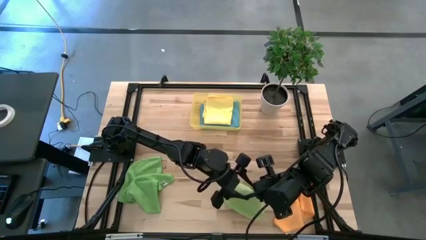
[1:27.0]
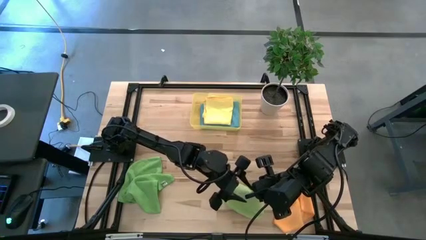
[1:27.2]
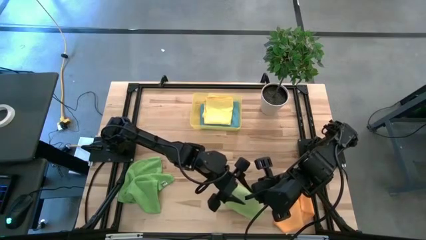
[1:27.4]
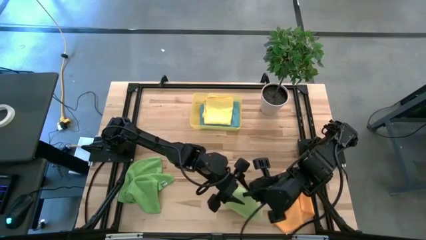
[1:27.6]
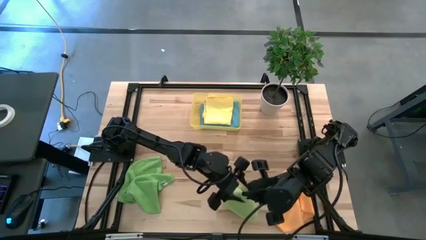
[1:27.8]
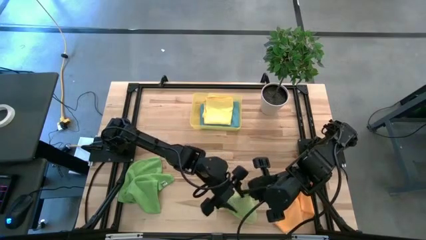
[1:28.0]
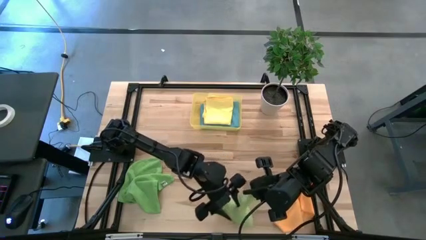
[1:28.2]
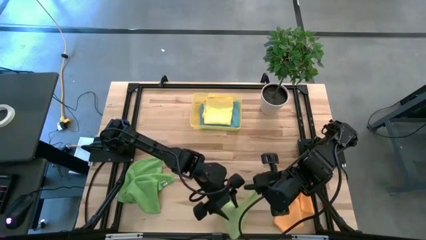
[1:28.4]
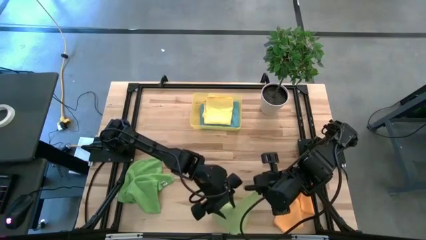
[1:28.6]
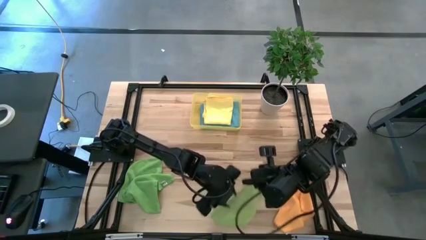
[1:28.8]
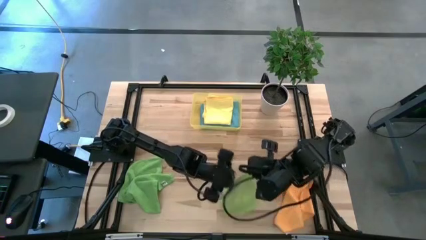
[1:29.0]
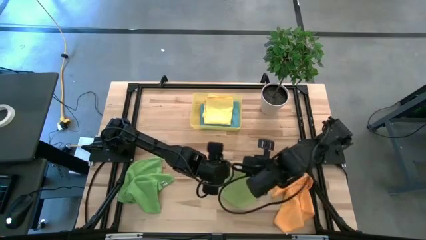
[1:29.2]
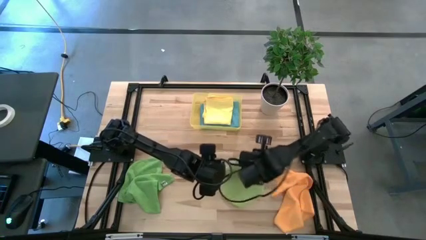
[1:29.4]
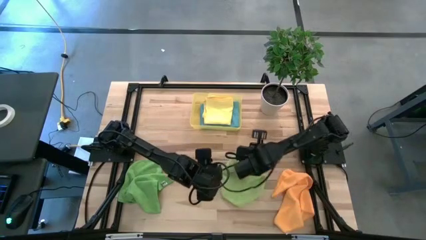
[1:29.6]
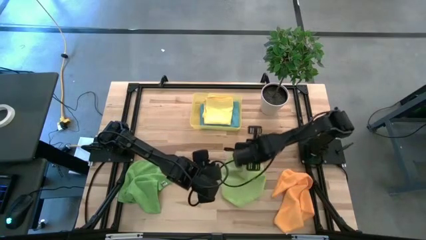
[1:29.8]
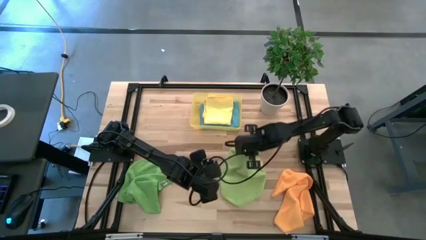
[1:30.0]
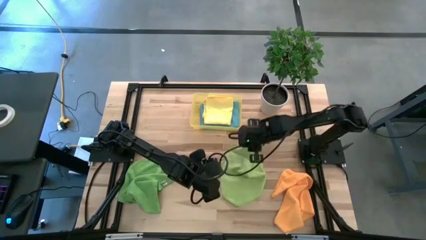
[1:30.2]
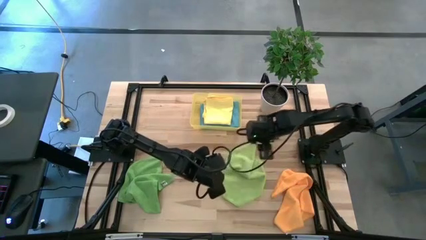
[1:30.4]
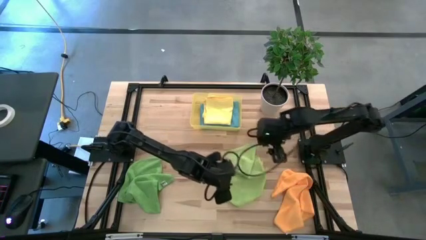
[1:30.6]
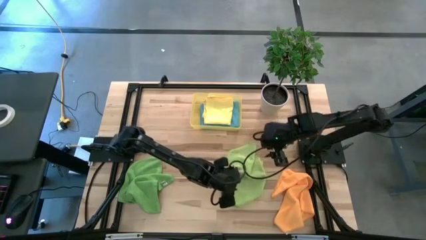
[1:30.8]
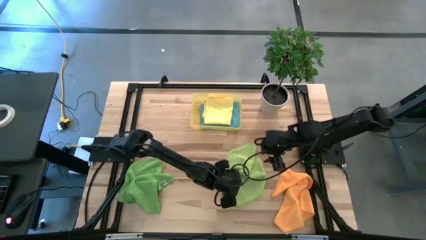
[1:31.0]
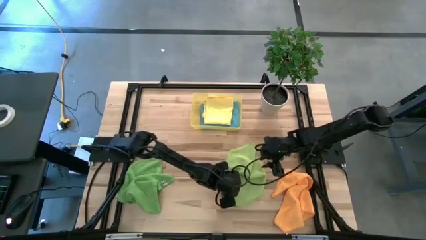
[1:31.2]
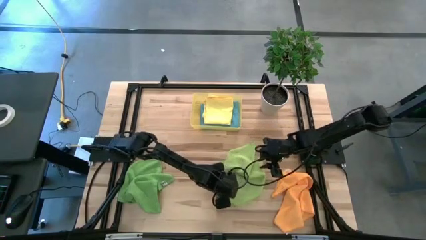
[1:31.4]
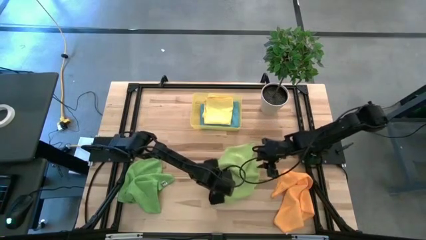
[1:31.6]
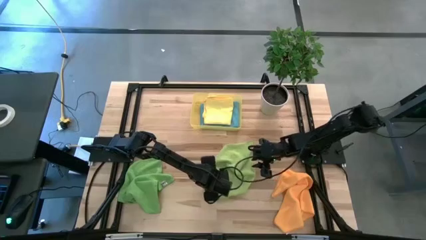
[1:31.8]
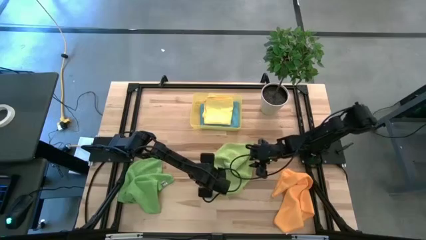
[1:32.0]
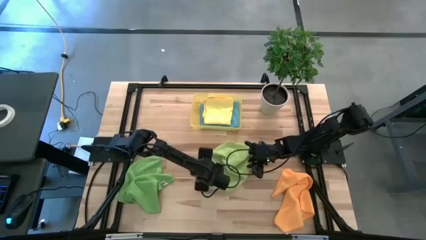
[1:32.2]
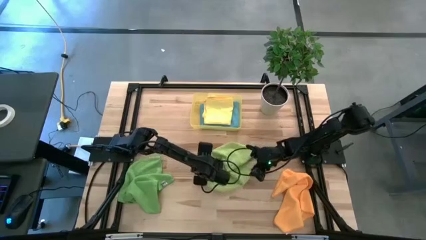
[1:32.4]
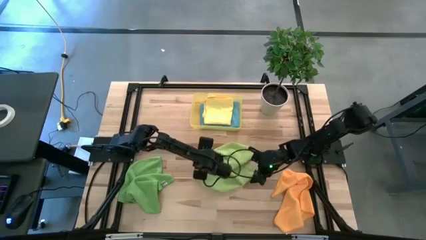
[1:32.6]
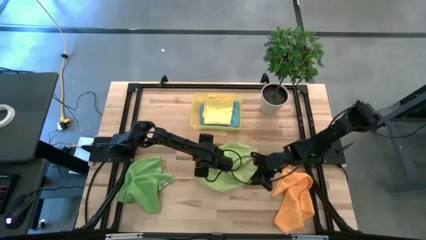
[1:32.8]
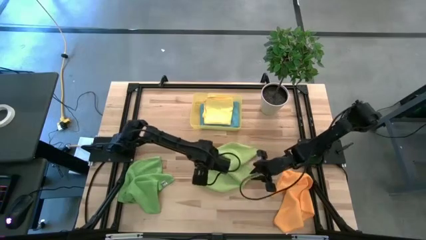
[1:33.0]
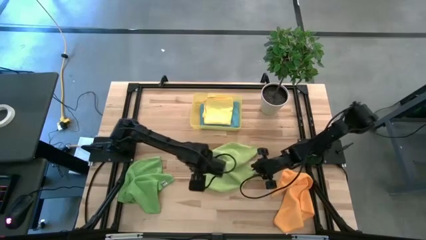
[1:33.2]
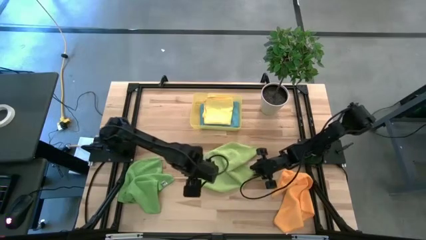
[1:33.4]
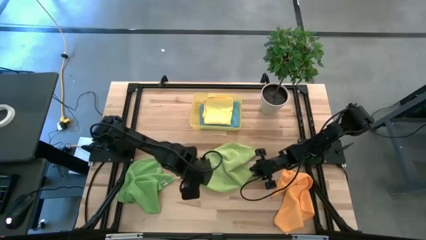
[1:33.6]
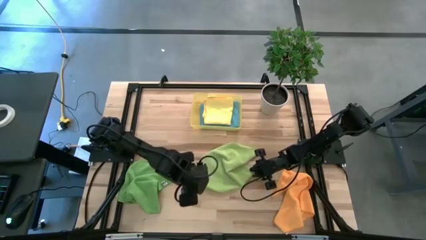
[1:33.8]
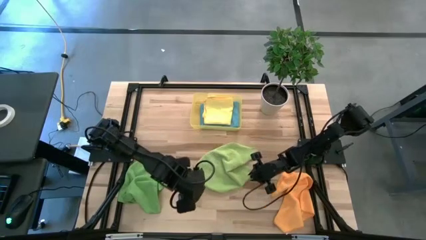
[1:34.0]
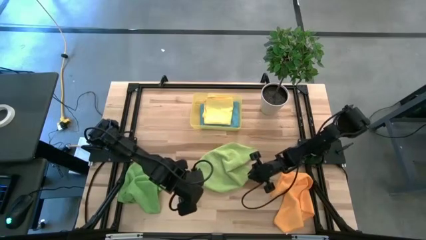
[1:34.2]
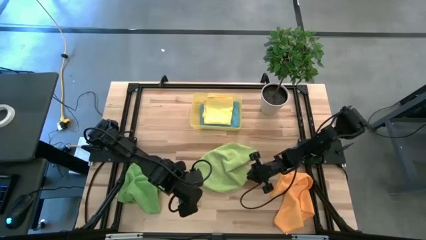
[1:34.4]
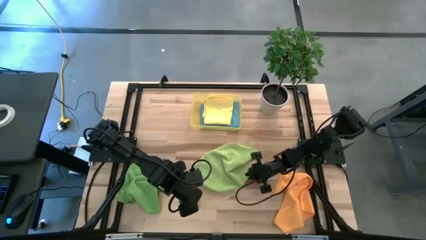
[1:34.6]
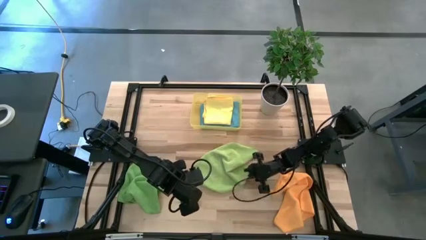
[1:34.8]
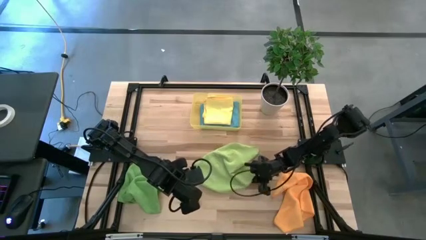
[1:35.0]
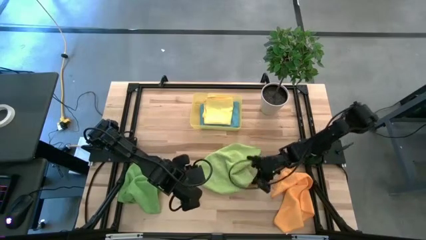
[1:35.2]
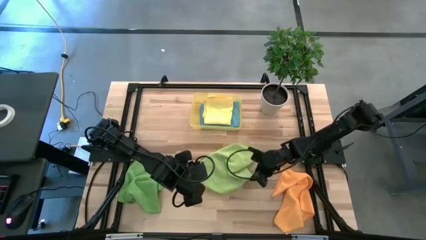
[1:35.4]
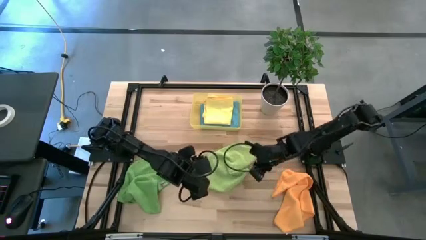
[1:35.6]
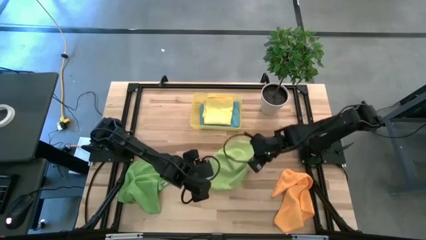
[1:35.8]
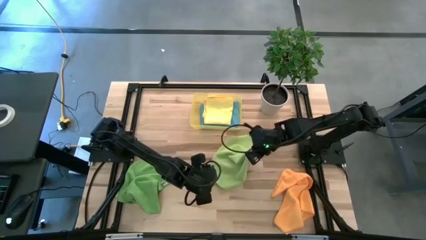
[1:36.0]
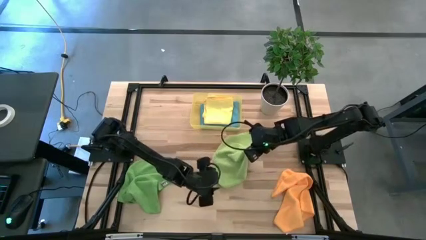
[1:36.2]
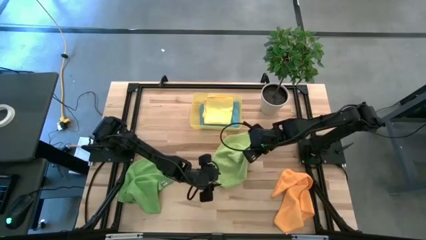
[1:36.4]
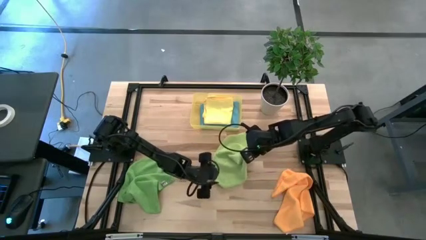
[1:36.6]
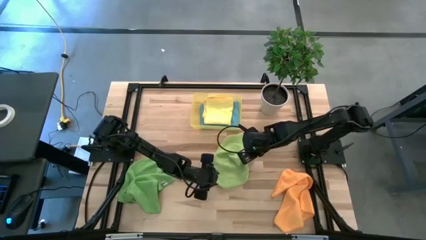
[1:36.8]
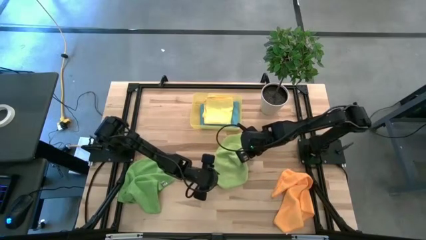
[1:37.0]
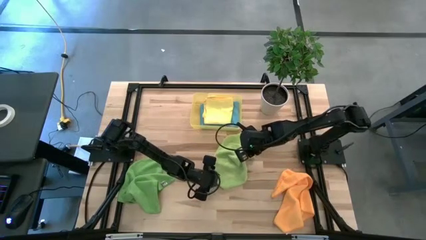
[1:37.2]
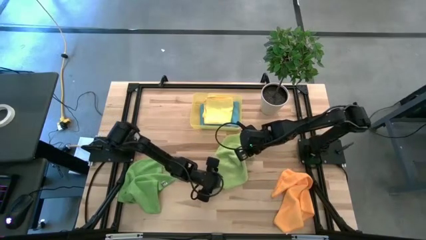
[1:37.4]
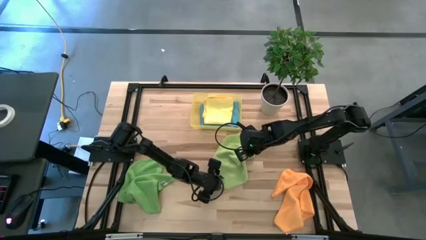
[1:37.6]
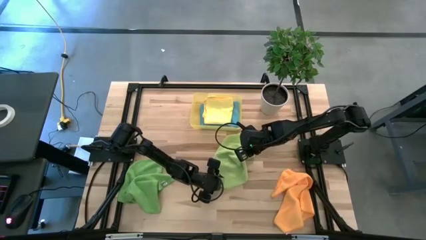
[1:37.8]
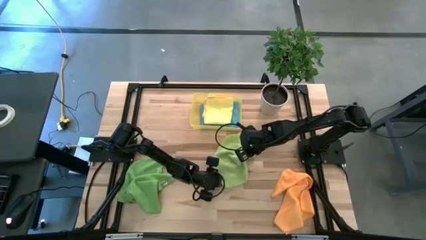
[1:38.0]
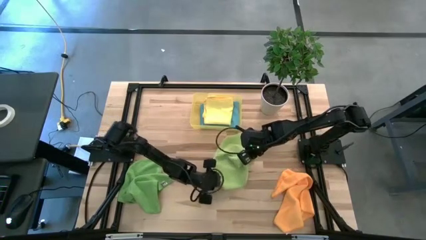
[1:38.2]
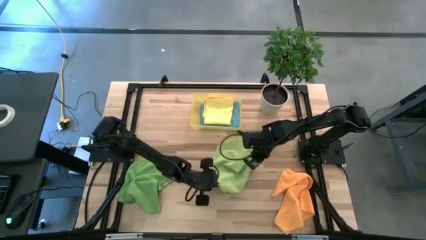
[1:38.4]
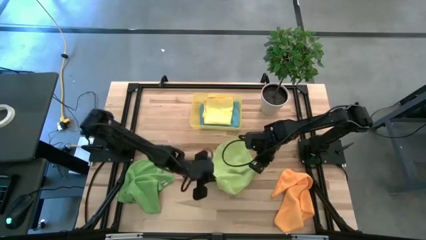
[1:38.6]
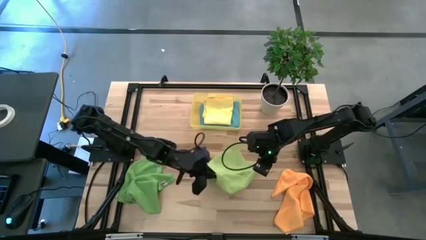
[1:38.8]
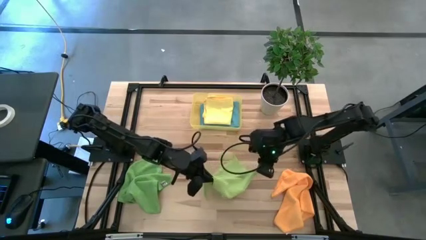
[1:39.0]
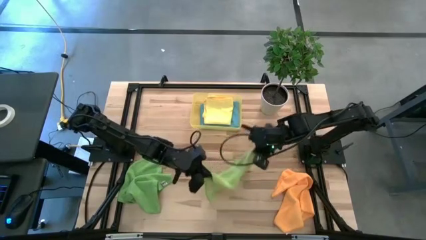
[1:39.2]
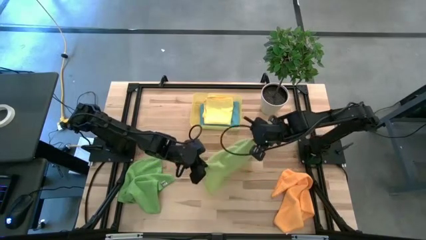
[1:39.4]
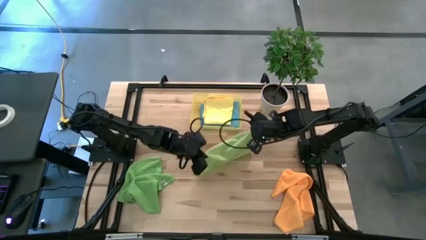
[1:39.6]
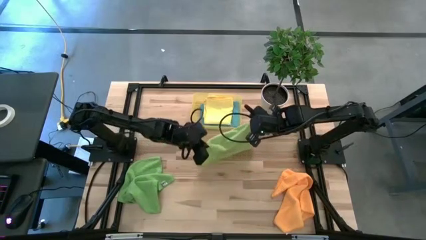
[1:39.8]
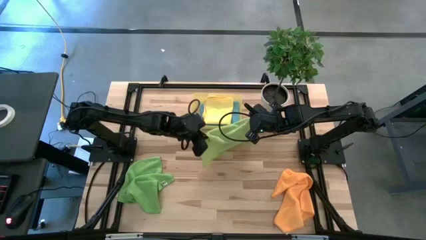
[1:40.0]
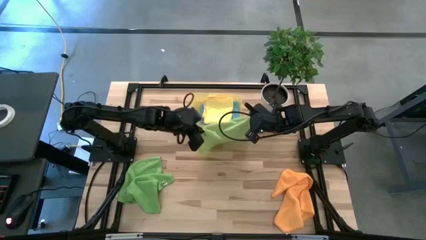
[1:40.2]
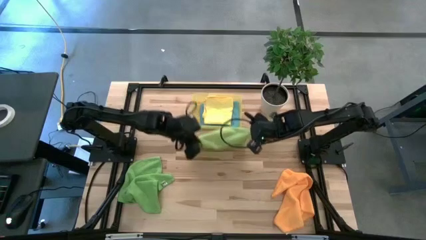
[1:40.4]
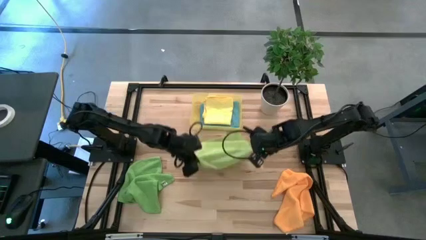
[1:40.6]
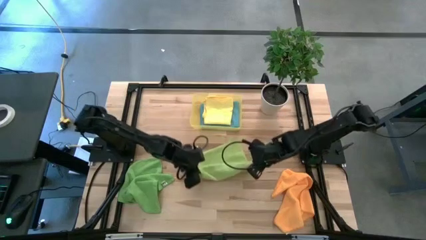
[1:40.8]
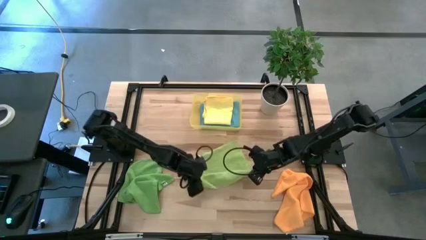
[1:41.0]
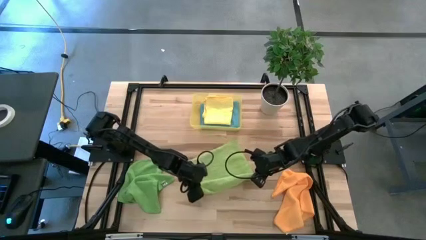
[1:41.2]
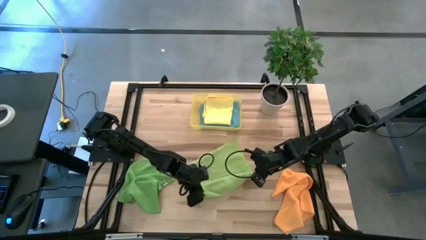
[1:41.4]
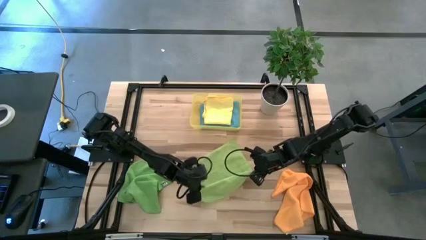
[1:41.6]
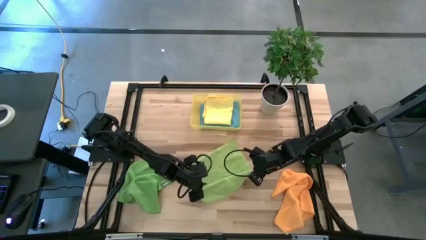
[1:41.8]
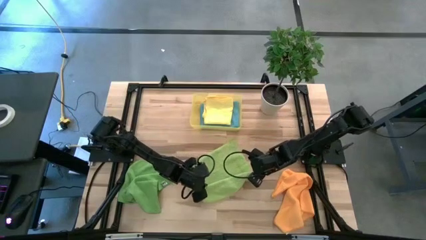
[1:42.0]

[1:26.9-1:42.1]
Task: Fold microfiber towels
Fold the light green microfiber cloth
